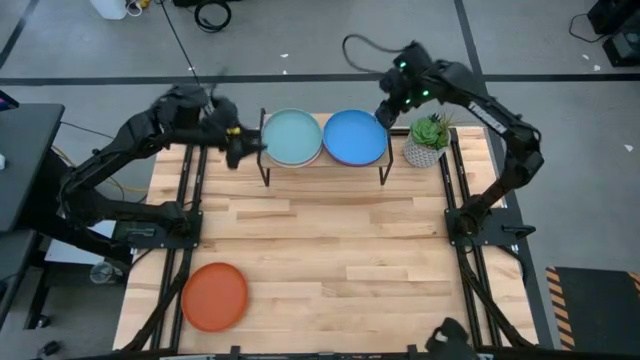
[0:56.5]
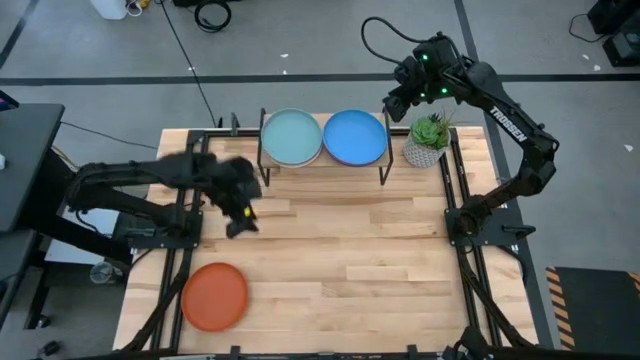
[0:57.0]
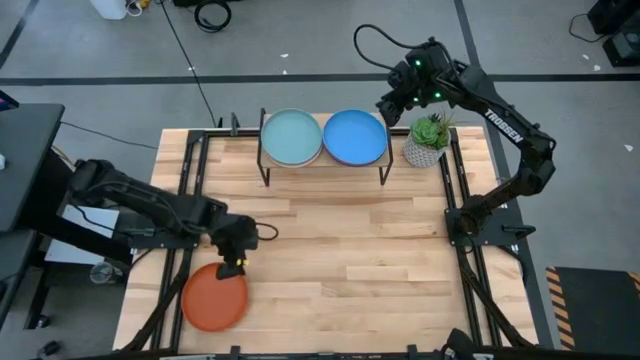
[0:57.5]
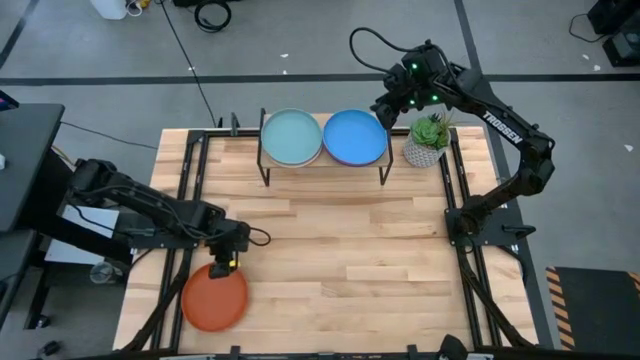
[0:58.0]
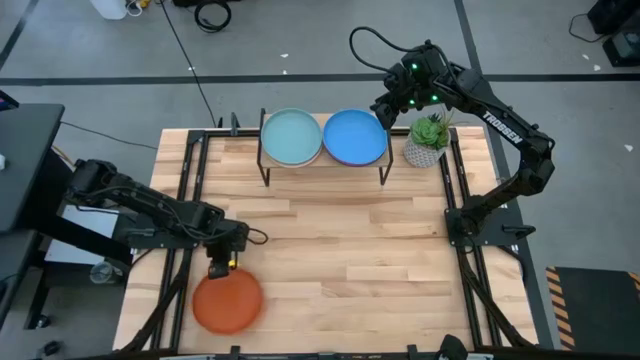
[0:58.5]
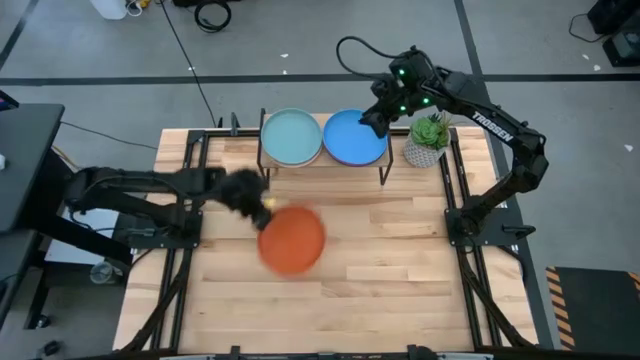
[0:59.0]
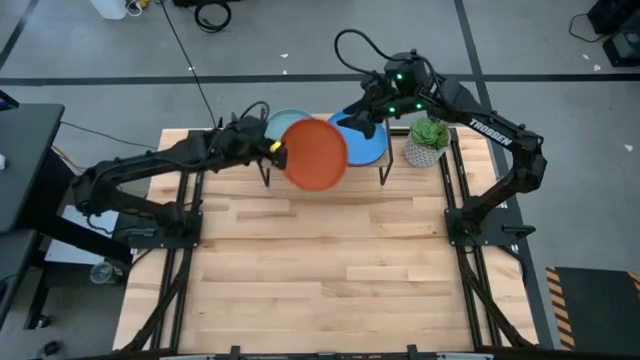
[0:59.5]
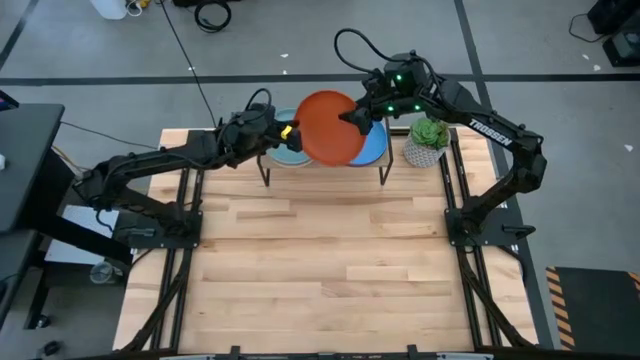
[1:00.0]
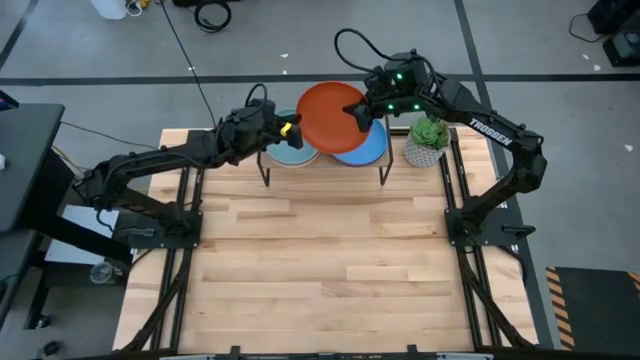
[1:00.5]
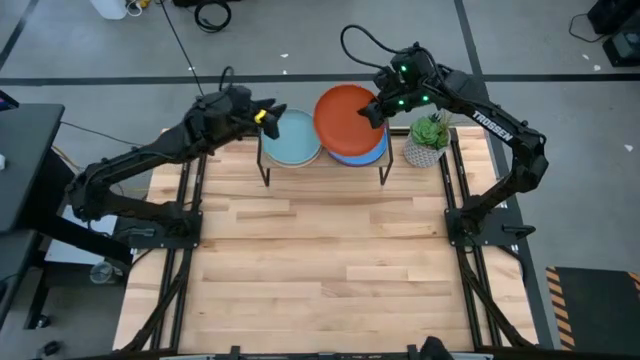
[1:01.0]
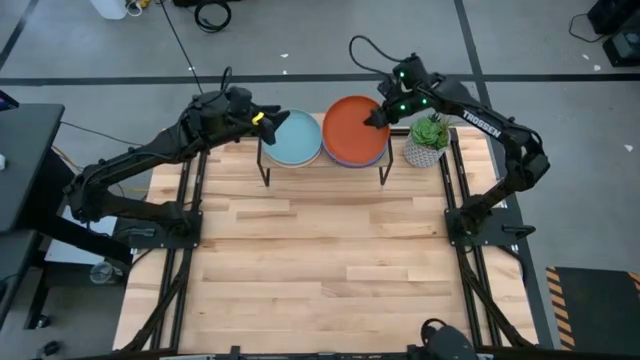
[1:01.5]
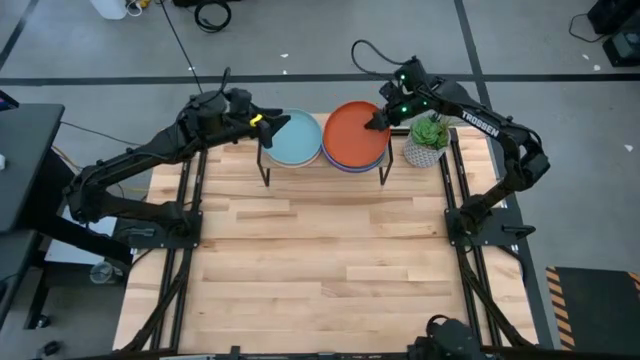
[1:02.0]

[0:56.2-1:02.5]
Task: Place and stack plates onto a shelf
Stack the orange plate on top of the blue plate on the shelf

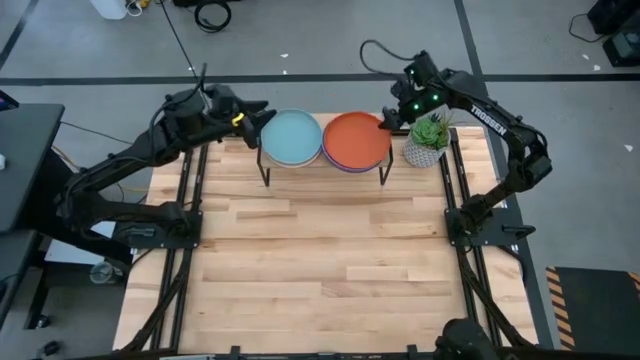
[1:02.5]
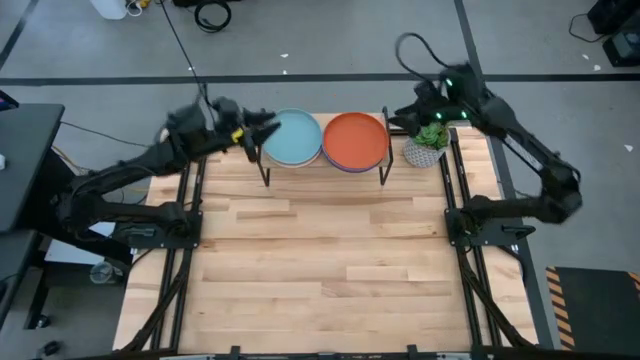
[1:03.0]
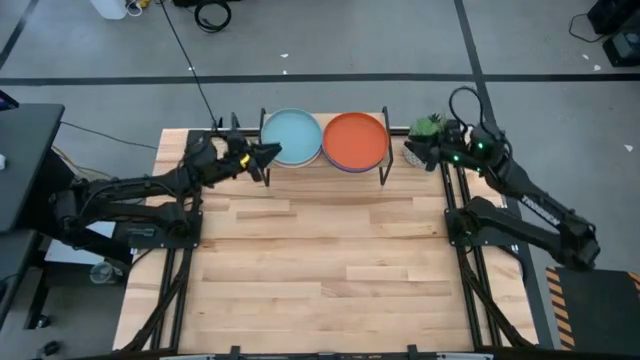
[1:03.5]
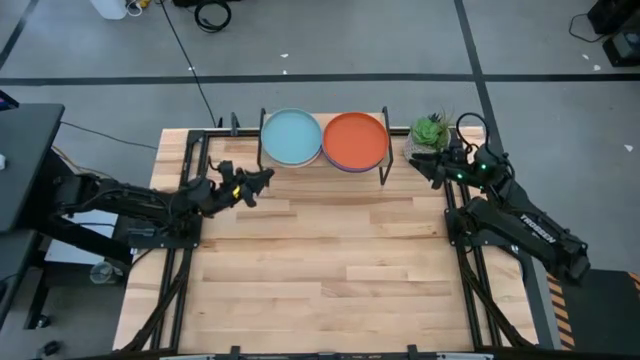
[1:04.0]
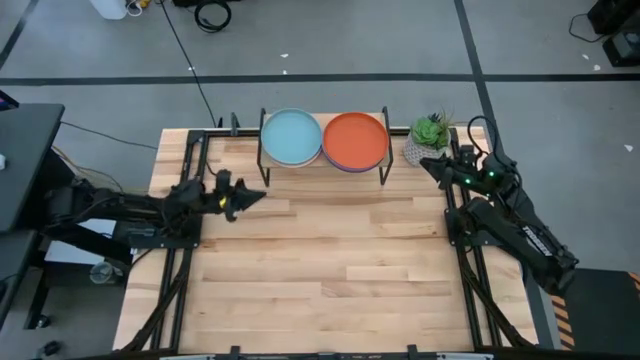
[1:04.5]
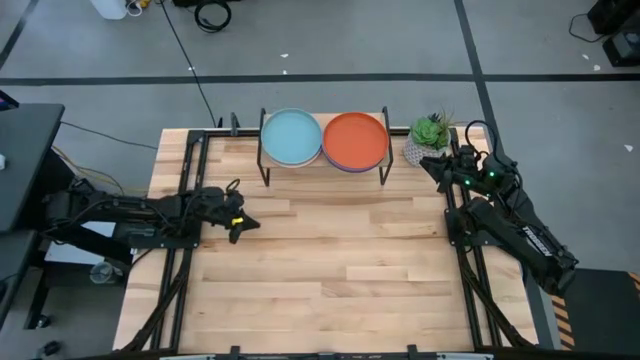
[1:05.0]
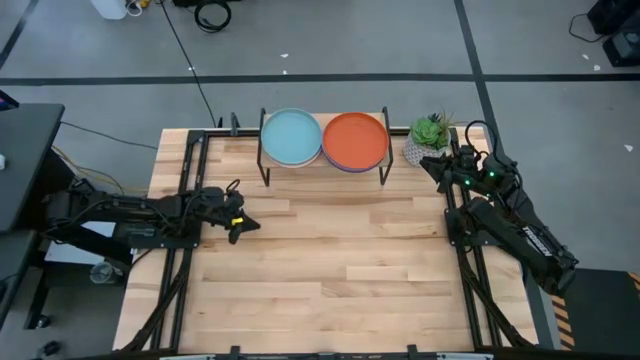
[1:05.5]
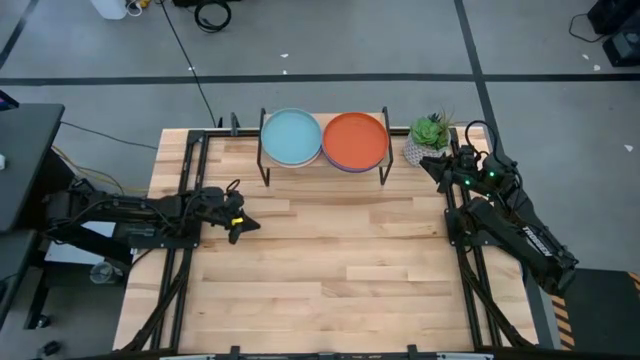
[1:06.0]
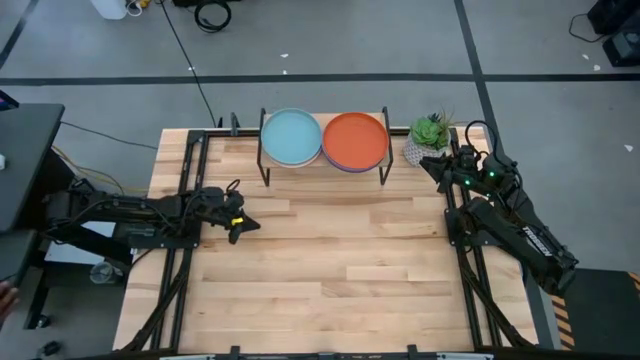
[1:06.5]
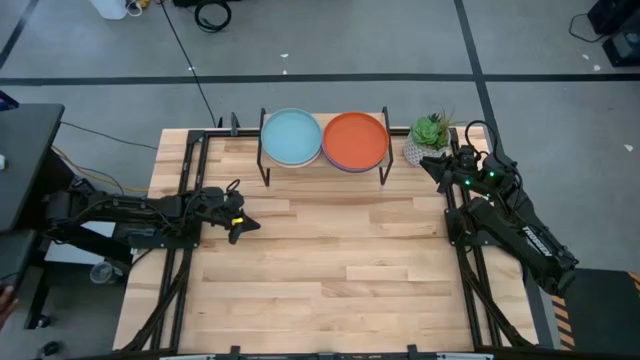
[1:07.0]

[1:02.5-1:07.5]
Return to Home Position

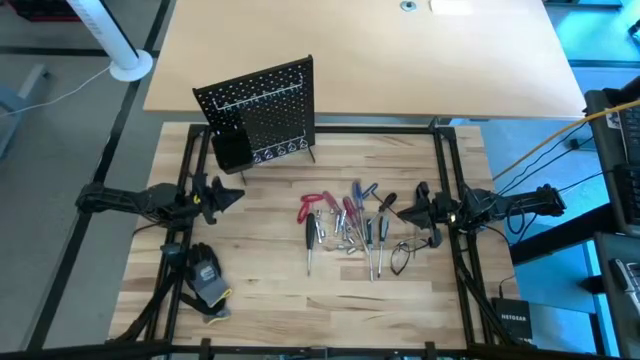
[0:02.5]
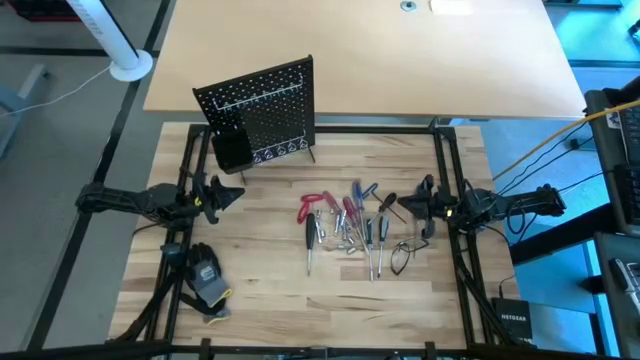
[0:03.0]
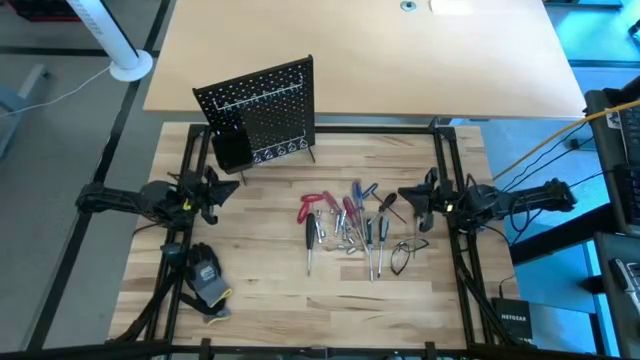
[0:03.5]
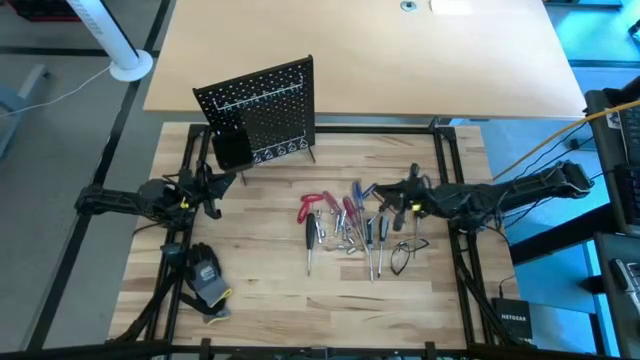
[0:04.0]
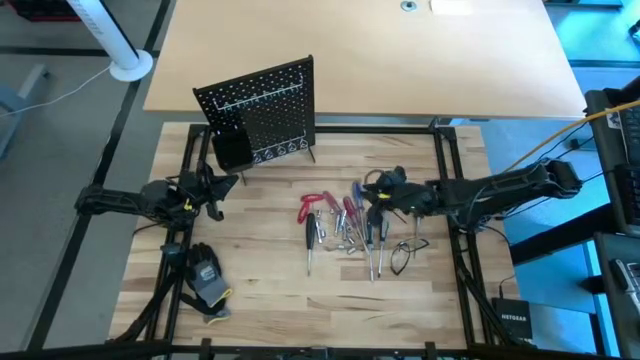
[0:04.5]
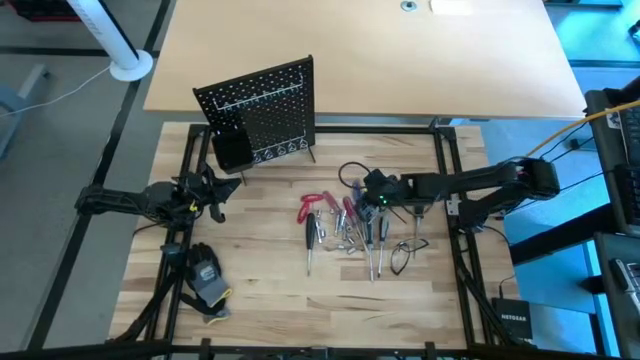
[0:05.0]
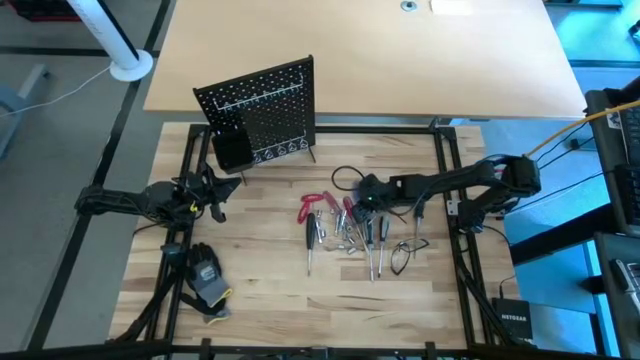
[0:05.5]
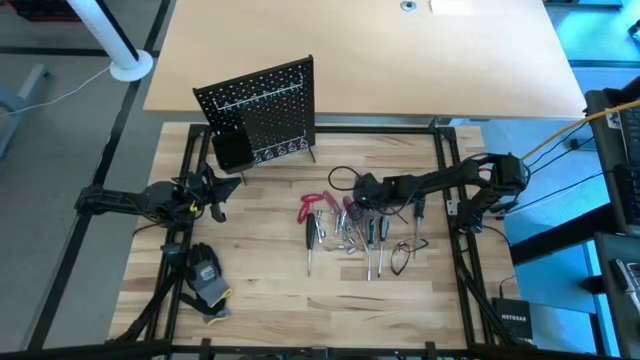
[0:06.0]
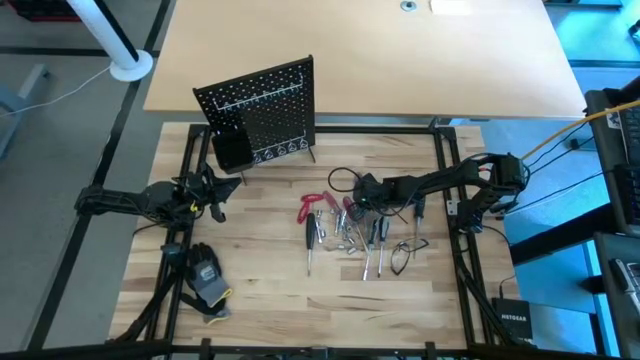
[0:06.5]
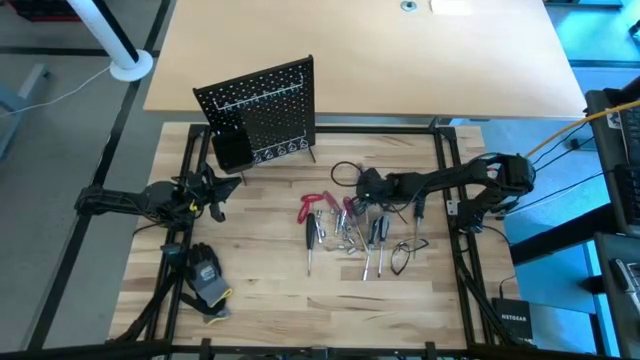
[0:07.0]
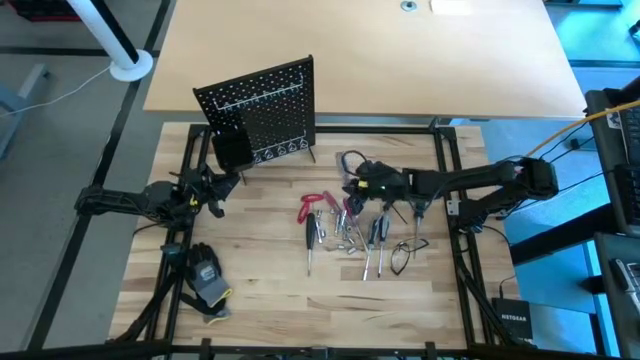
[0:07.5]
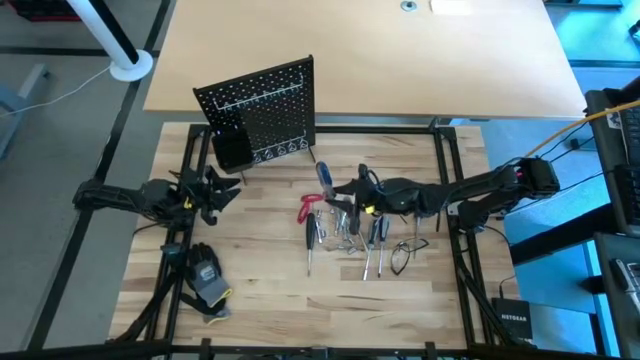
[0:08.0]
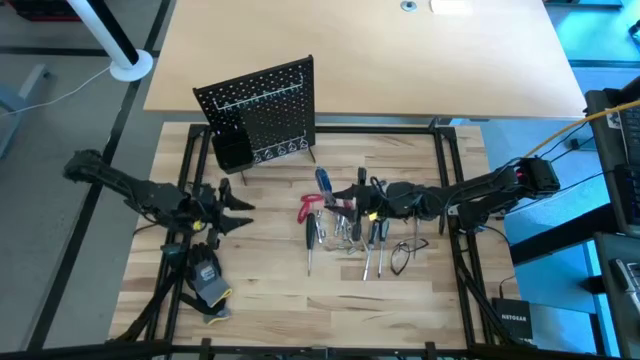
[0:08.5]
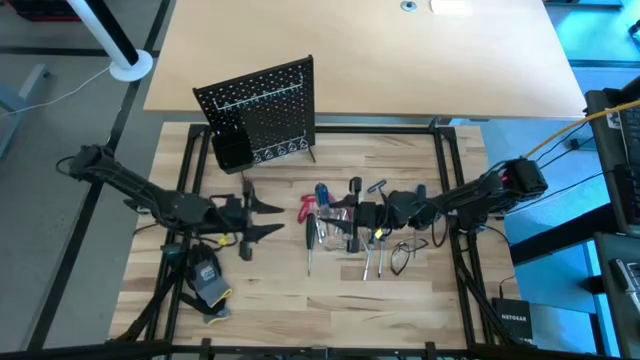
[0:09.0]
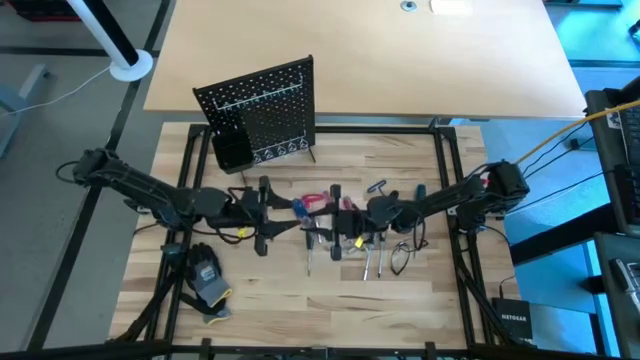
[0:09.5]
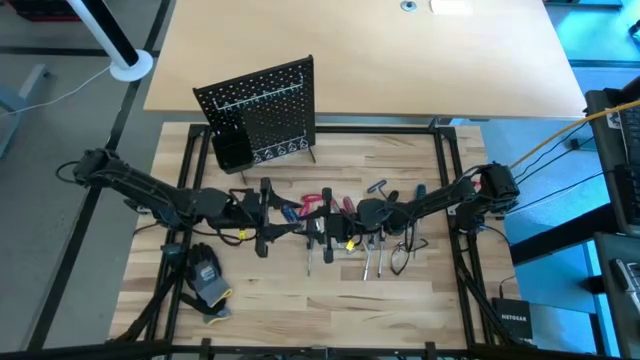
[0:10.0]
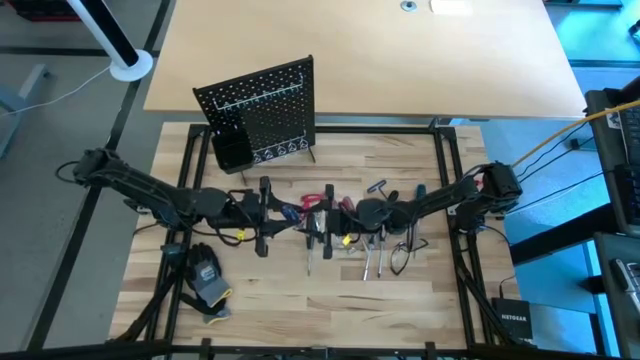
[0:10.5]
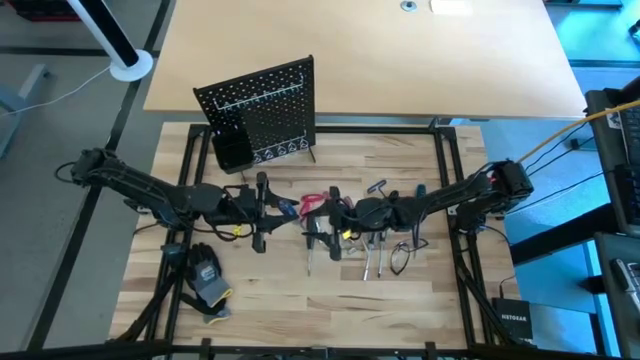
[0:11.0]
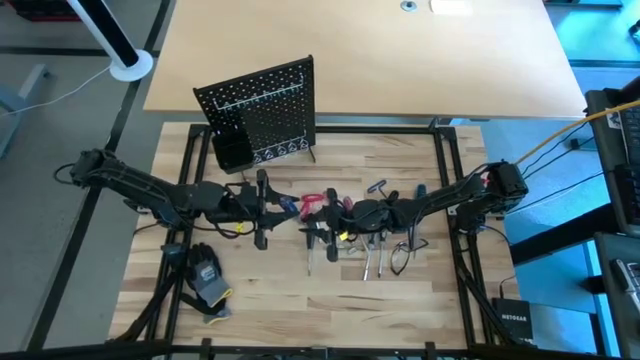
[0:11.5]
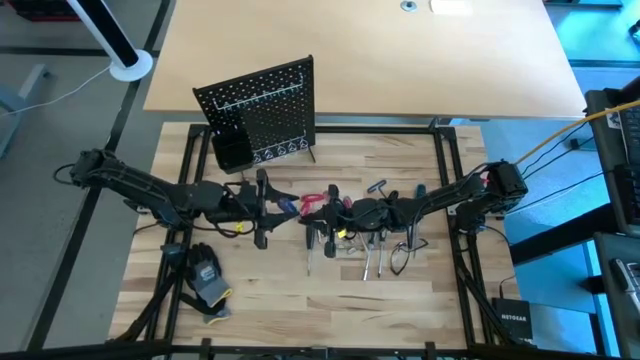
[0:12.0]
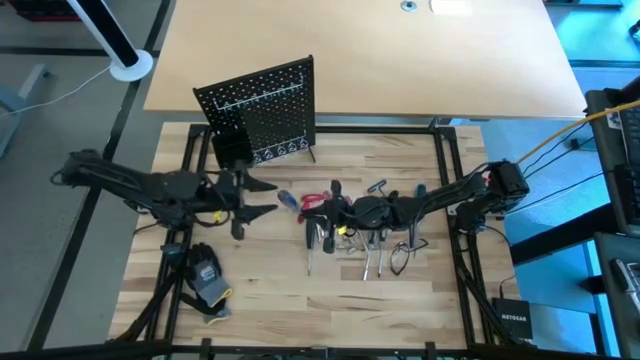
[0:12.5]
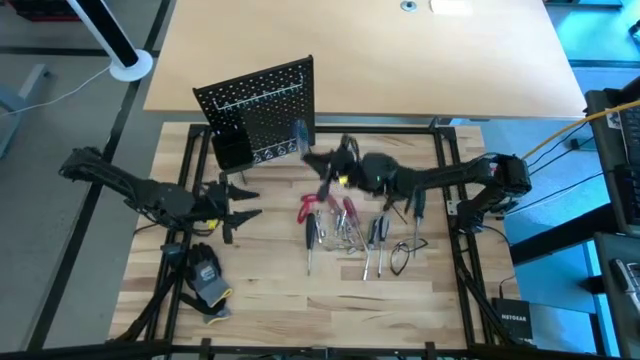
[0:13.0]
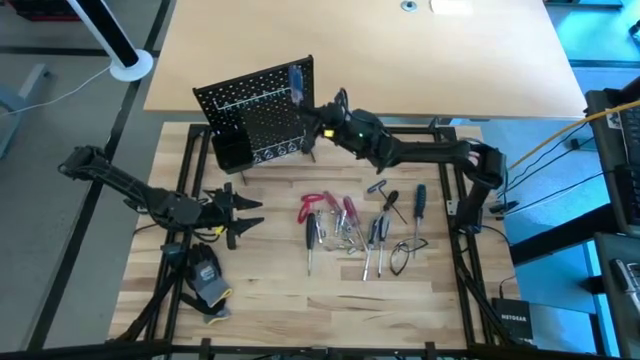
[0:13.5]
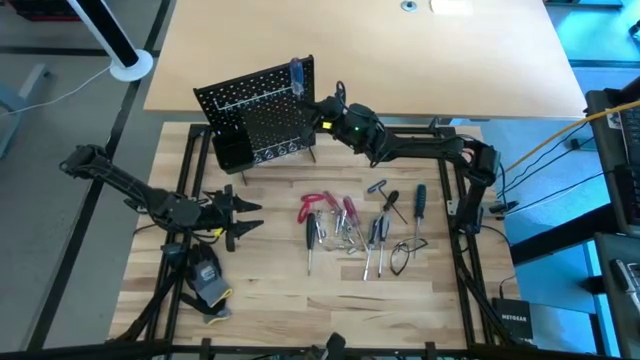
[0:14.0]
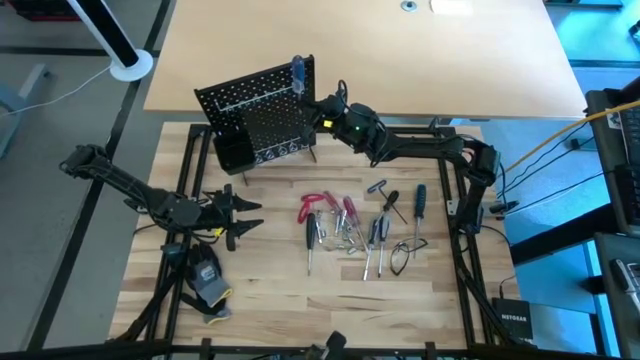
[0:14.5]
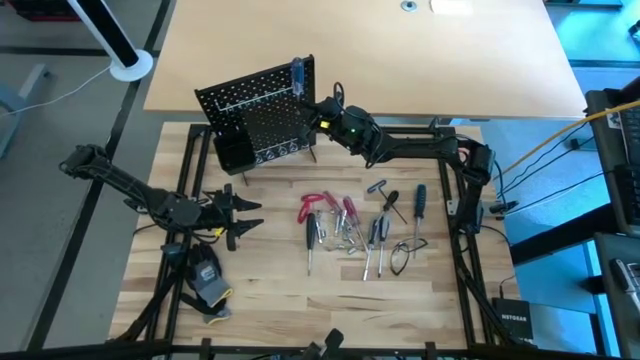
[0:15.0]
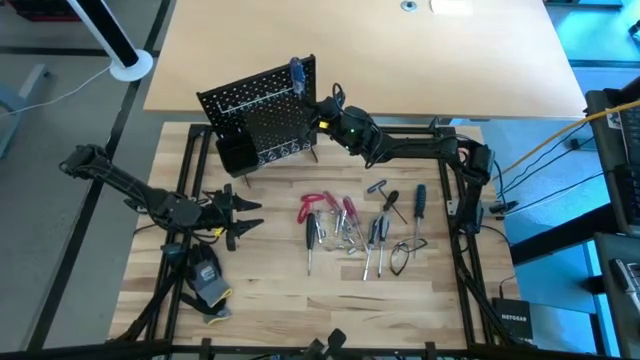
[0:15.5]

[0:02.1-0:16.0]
Task: Hang tools onto peg board
Hang the blue screwdriver onto the peg board
